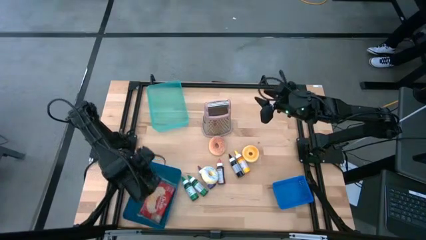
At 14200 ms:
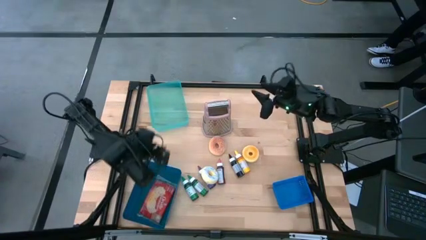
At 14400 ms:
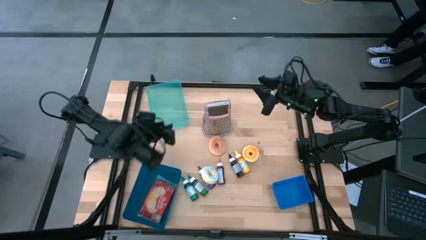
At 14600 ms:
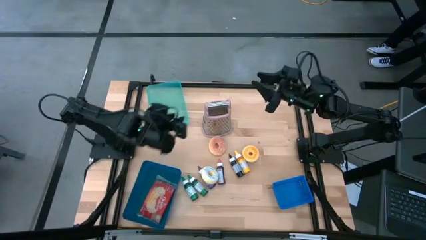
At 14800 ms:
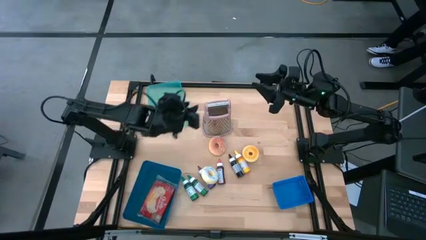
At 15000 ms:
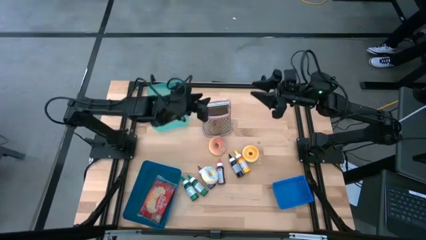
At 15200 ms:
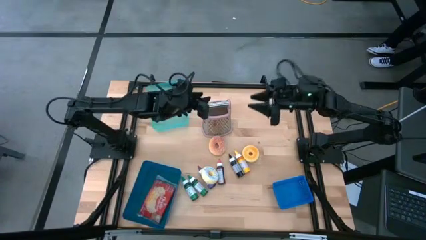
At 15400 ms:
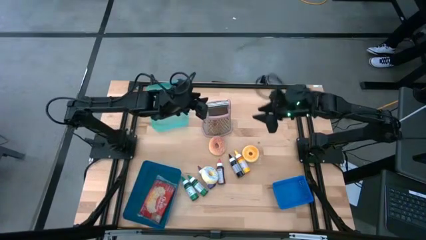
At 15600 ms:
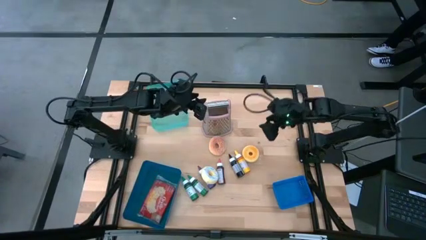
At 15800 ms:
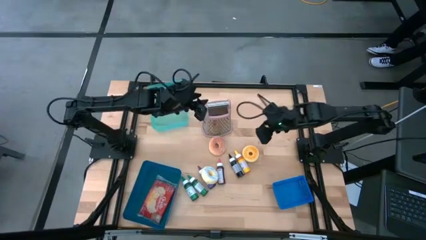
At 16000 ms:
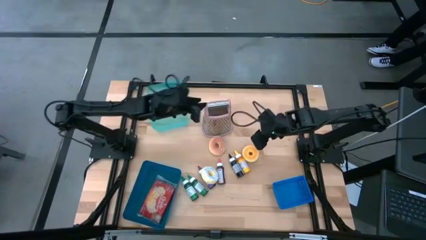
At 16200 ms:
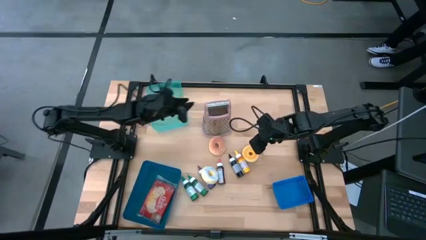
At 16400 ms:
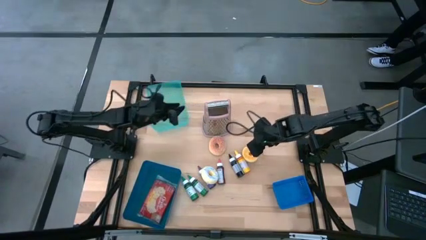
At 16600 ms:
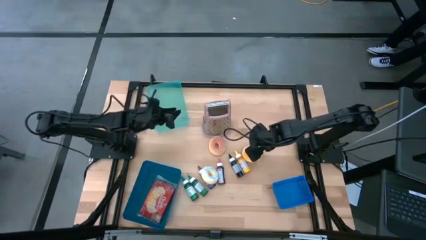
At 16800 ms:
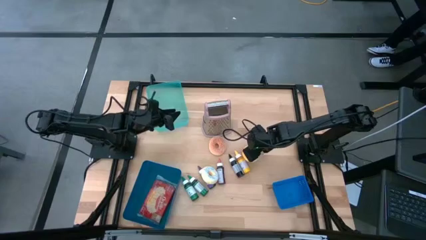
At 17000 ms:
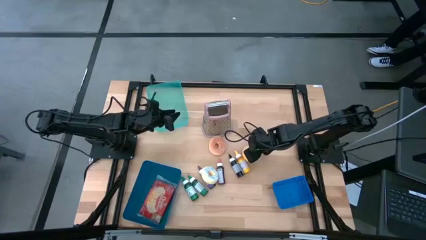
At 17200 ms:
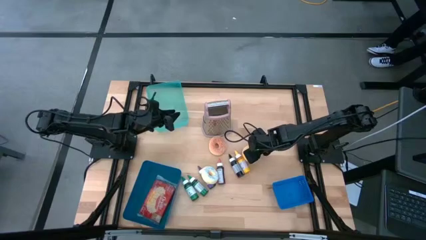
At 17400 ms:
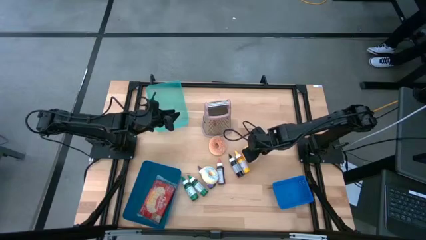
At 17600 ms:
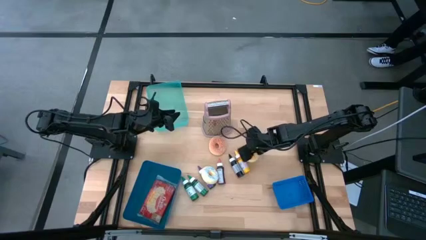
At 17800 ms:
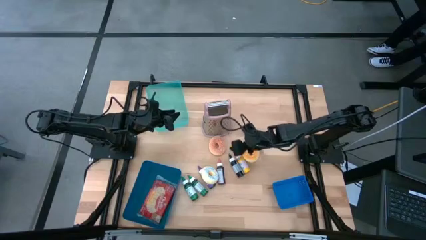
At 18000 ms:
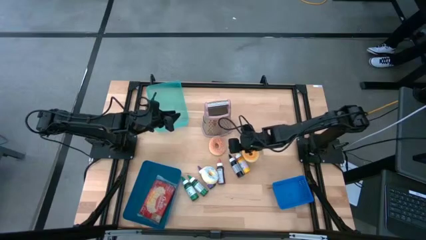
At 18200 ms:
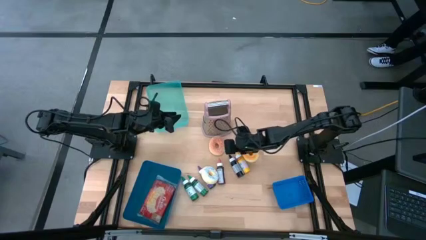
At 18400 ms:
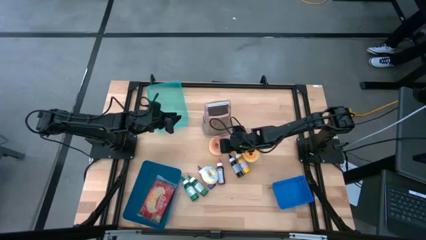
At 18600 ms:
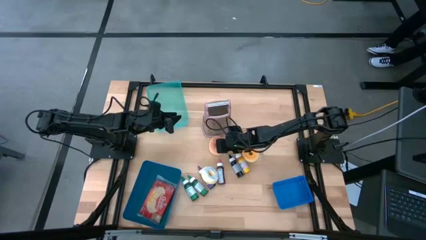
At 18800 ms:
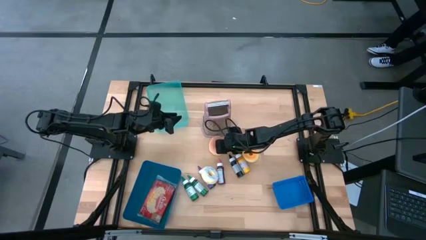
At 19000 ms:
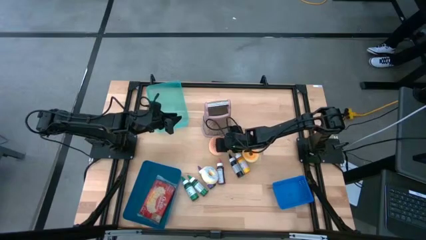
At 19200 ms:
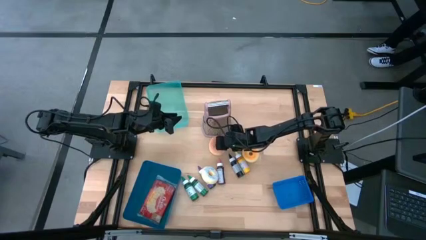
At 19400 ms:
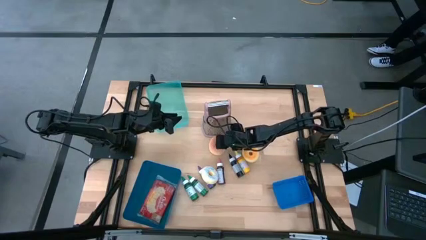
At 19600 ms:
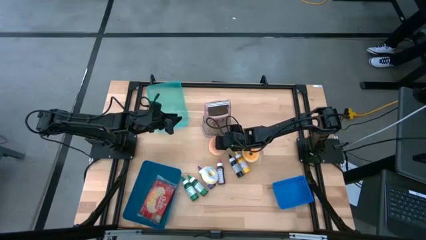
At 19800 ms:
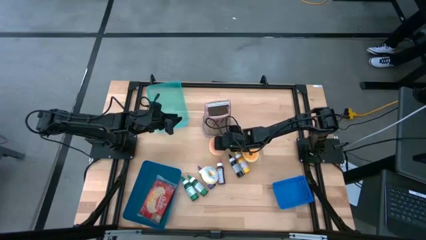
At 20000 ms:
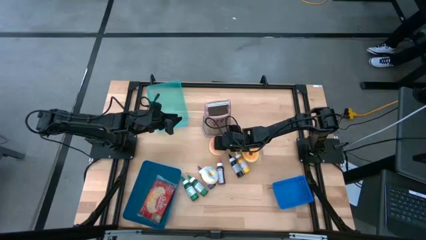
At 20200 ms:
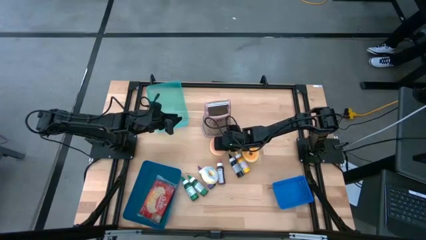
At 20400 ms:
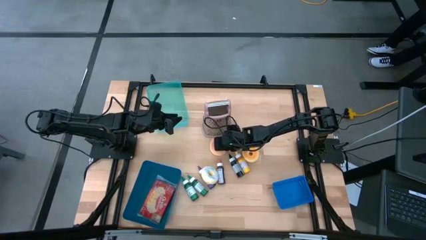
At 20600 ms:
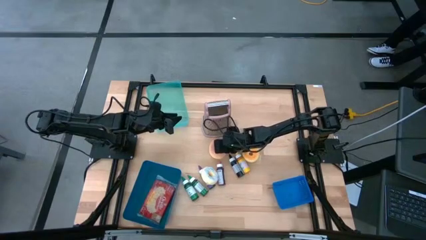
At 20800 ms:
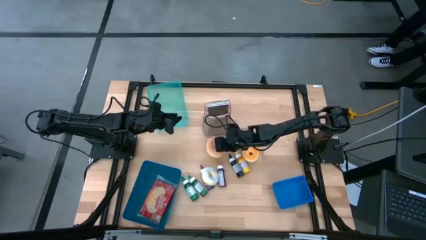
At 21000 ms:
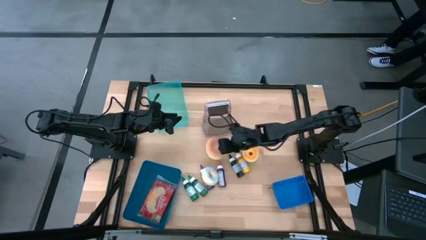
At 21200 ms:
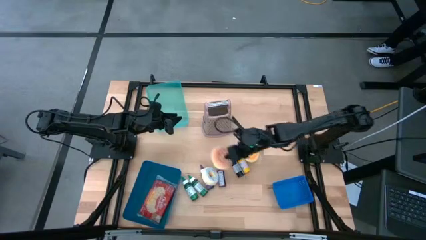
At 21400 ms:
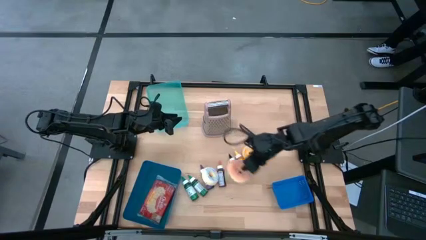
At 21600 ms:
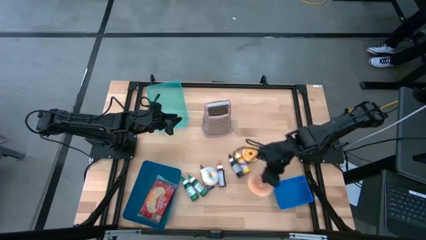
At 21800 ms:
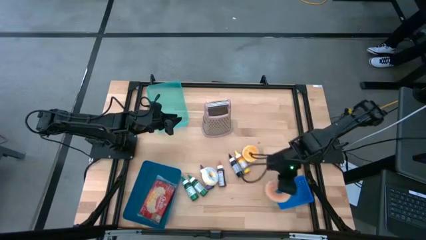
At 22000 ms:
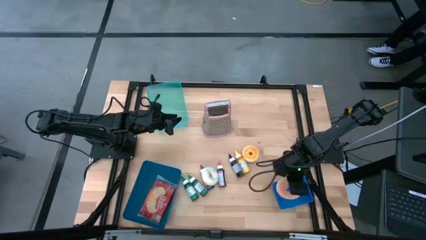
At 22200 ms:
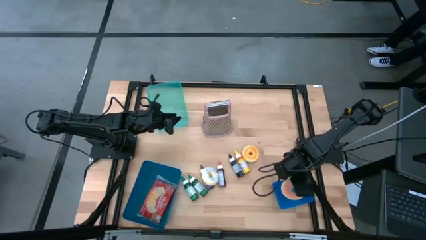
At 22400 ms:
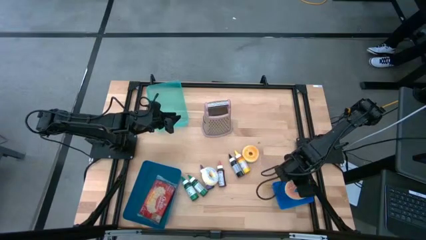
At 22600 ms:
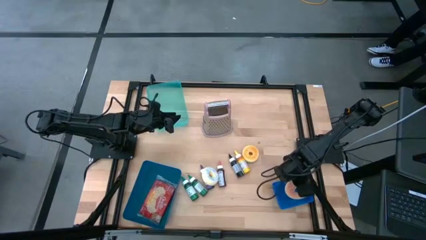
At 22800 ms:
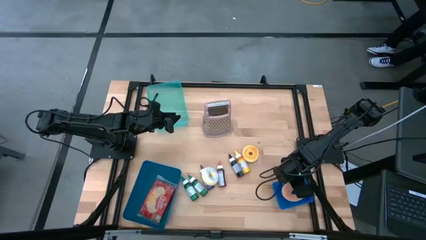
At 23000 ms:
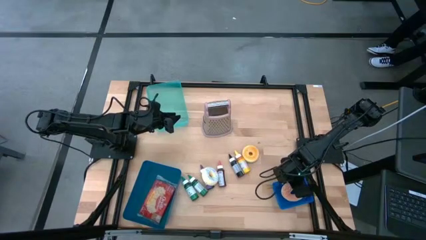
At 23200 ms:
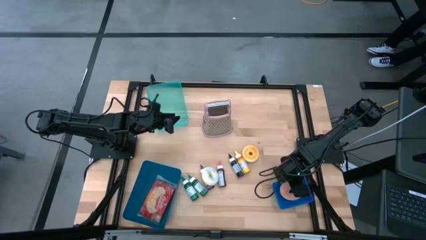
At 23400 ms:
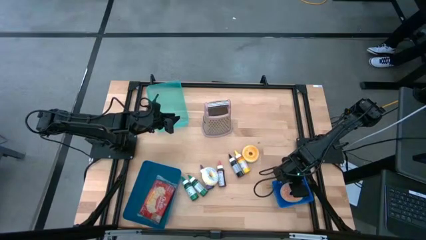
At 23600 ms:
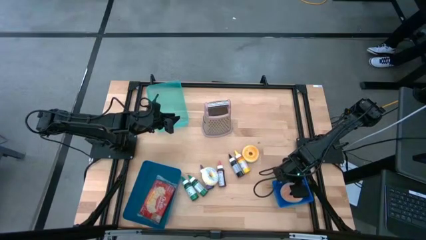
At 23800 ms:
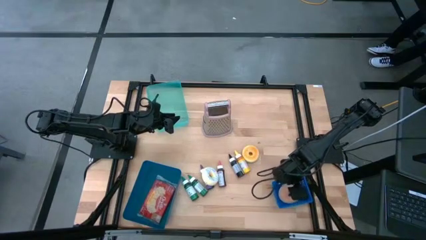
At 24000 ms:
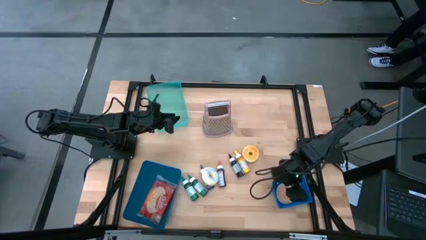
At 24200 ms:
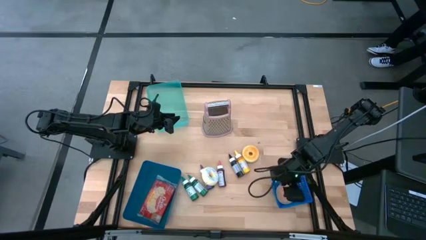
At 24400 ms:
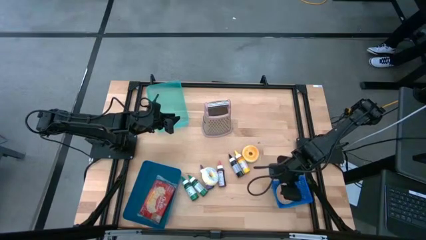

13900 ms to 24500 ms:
Put the brown donut into the blue bin

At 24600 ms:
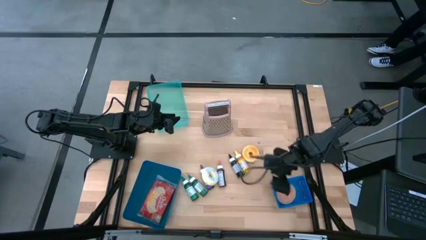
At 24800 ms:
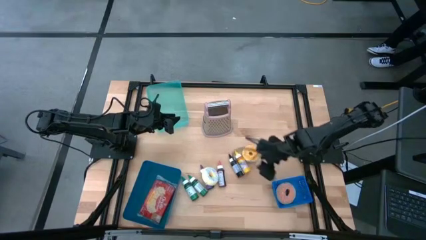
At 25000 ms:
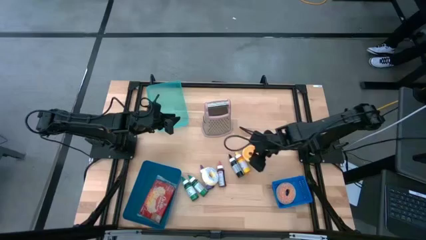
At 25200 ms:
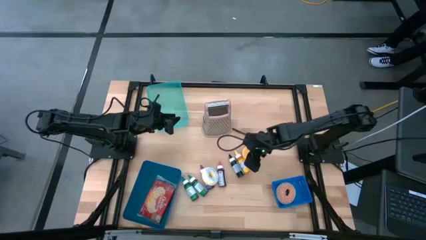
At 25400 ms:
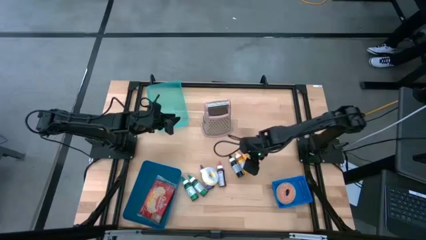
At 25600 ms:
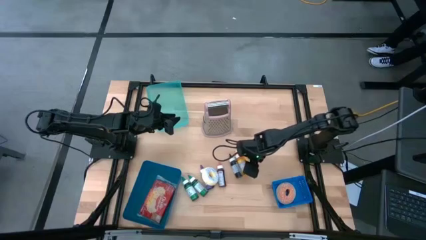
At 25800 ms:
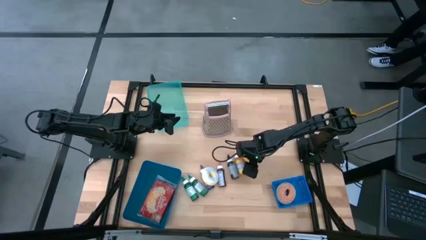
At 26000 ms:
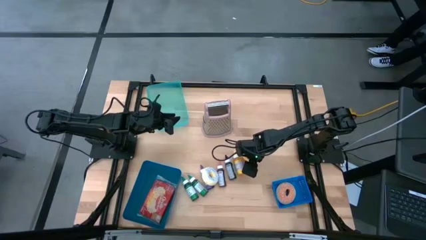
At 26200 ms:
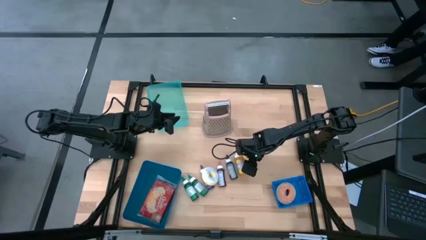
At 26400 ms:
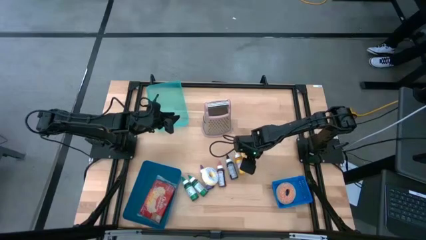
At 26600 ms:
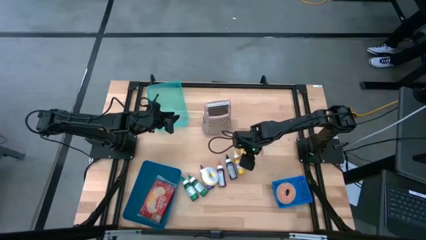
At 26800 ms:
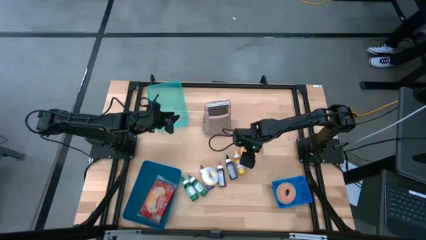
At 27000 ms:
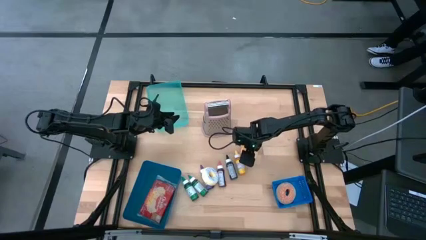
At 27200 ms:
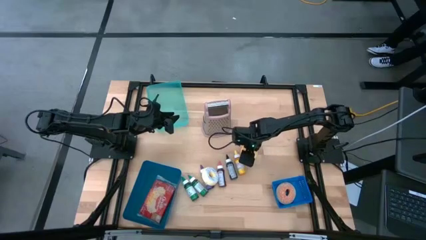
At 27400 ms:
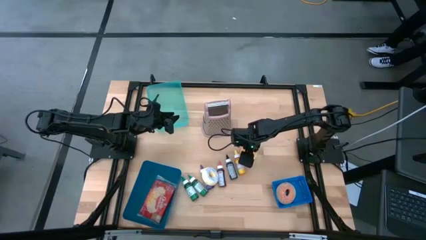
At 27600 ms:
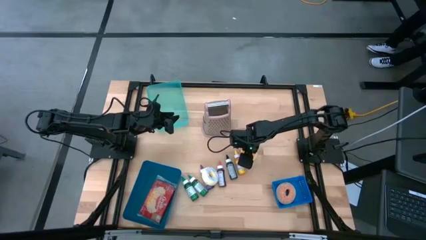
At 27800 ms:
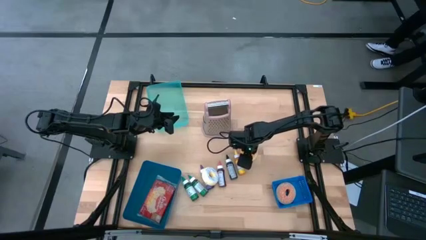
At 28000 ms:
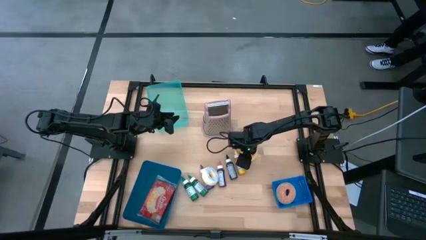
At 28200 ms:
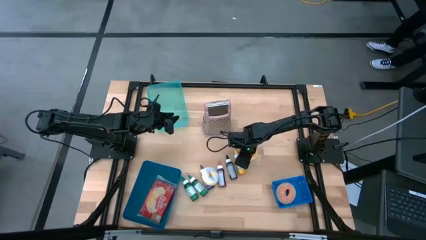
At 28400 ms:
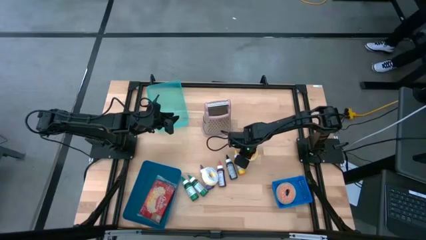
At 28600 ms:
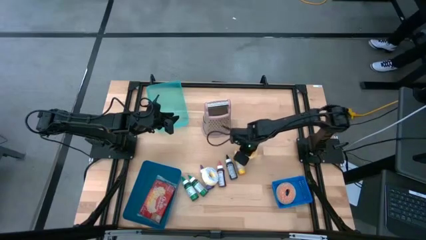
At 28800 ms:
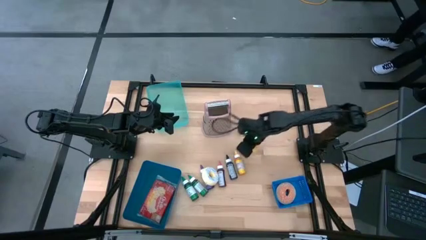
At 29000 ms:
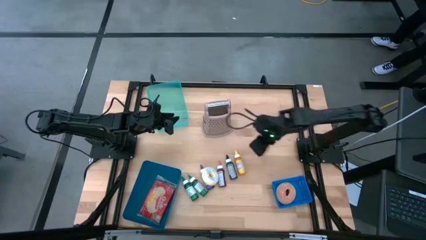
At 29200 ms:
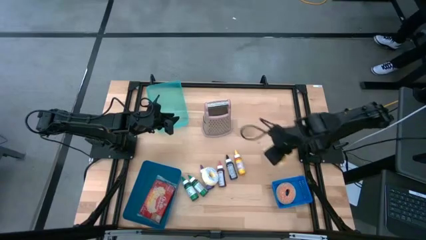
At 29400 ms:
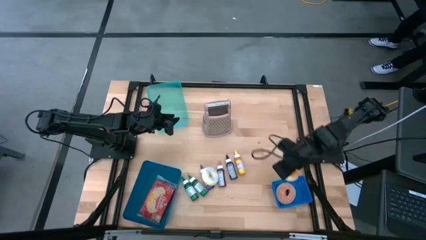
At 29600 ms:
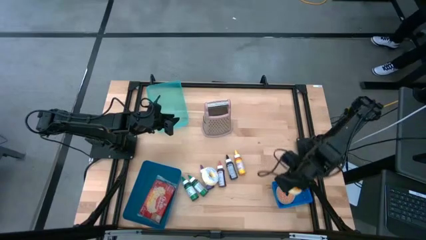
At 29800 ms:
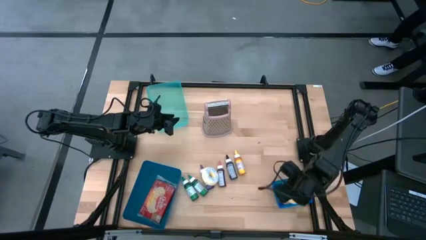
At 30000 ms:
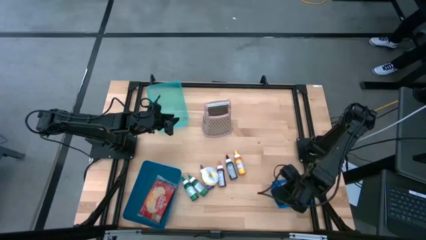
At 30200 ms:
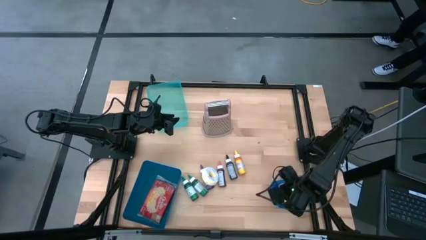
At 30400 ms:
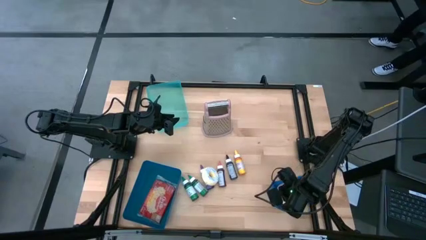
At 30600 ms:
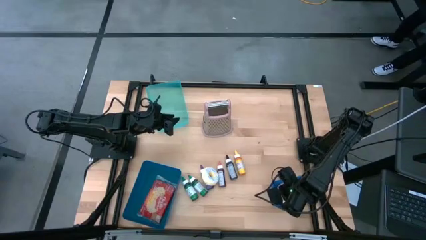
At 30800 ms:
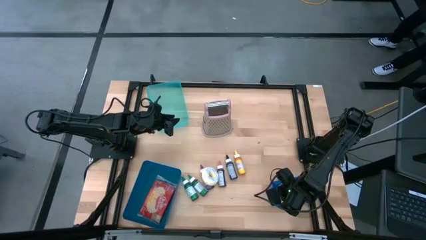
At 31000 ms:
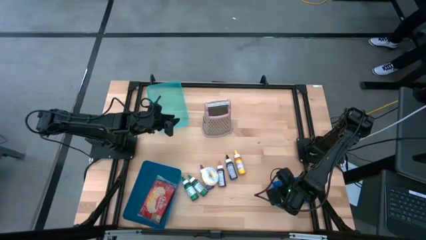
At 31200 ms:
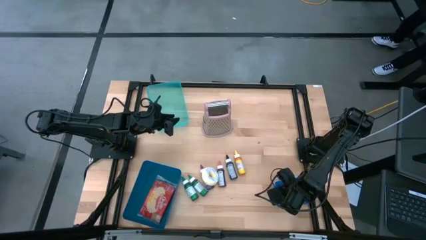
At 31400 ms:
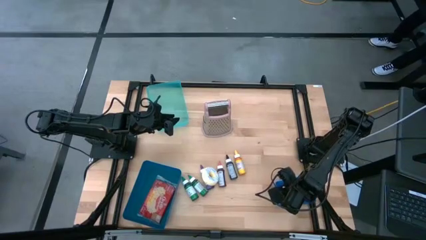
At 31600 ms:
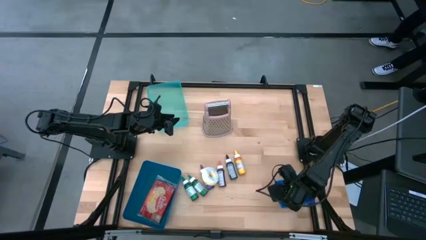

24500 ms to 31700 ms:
Put the right donut into the blue bin
